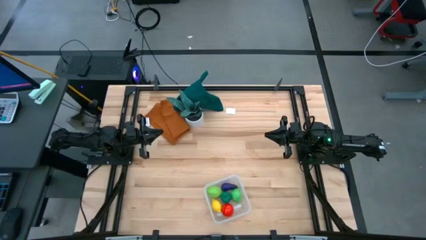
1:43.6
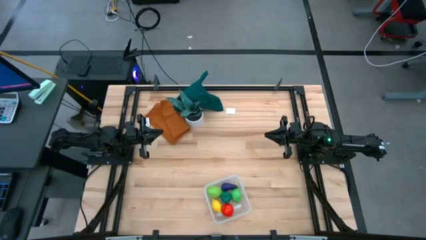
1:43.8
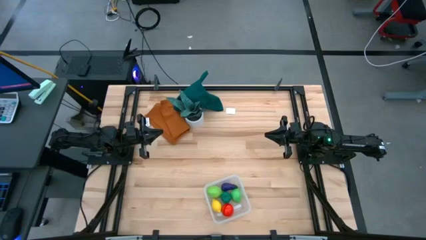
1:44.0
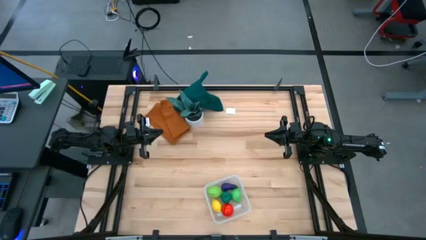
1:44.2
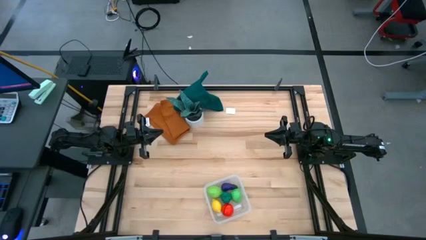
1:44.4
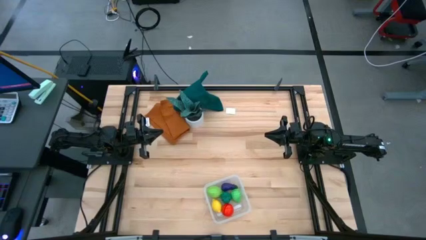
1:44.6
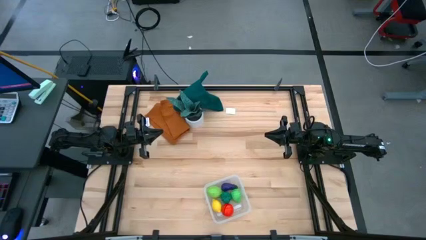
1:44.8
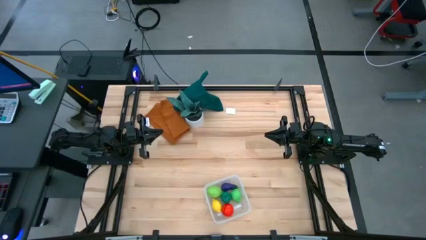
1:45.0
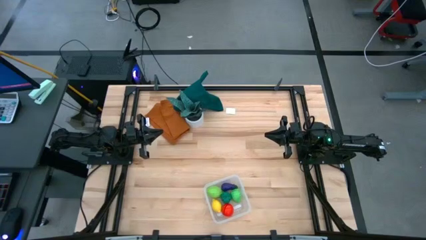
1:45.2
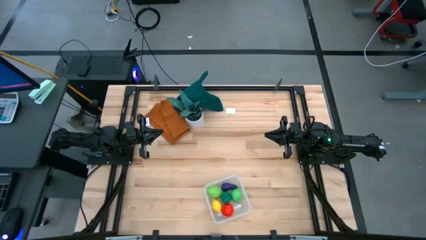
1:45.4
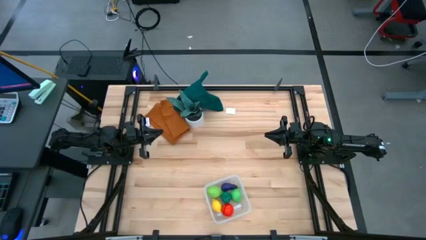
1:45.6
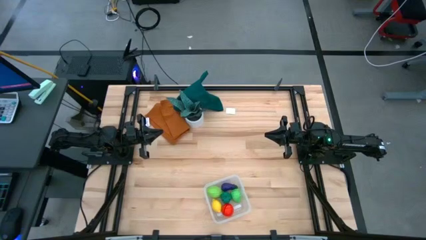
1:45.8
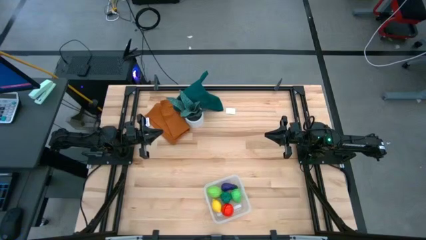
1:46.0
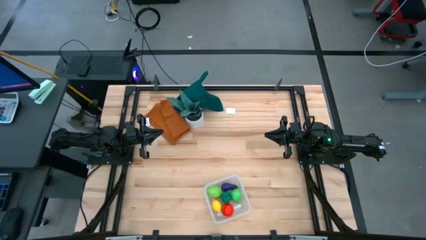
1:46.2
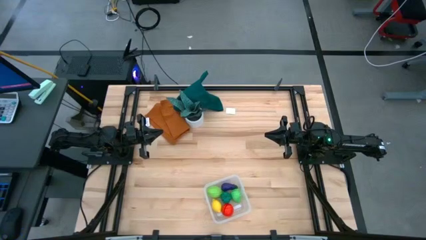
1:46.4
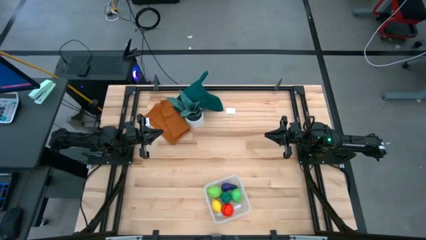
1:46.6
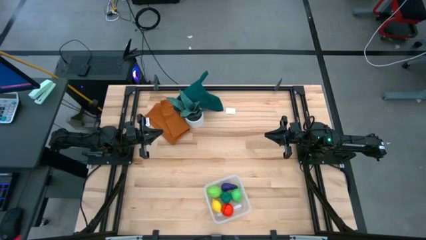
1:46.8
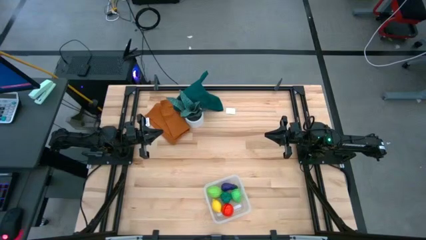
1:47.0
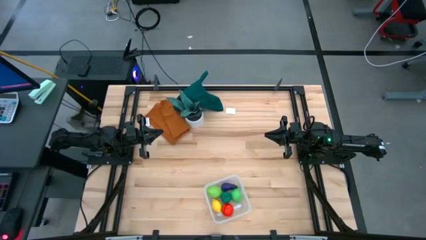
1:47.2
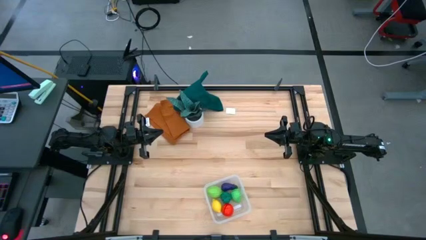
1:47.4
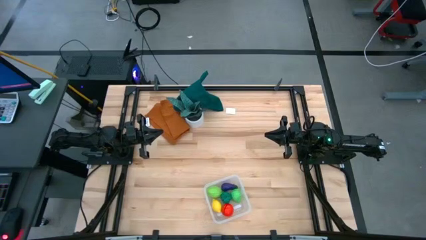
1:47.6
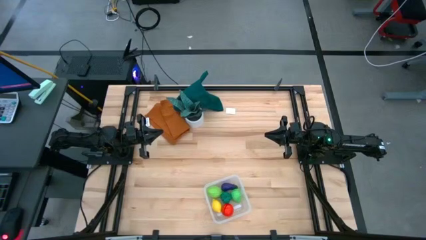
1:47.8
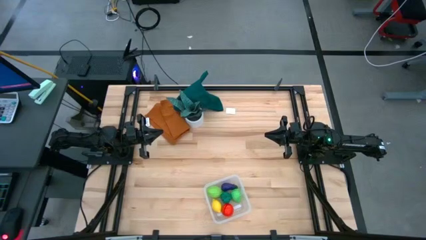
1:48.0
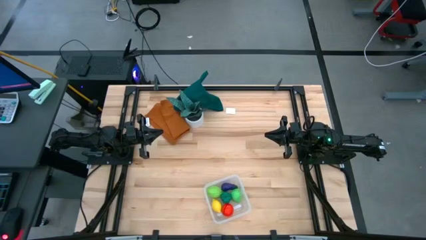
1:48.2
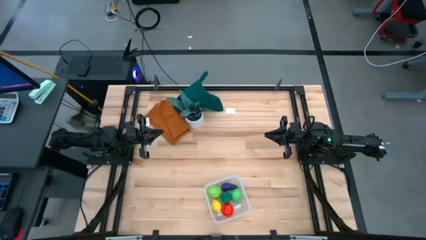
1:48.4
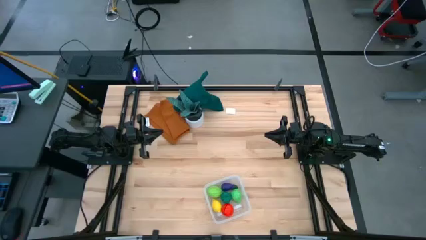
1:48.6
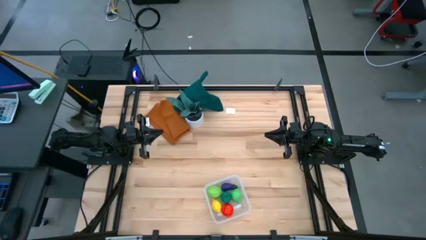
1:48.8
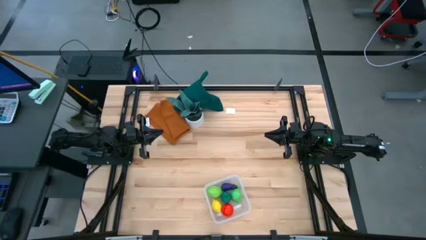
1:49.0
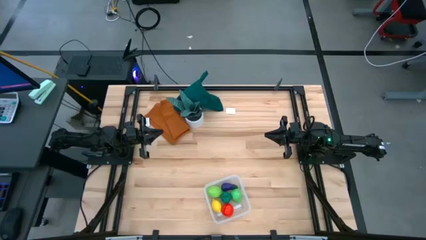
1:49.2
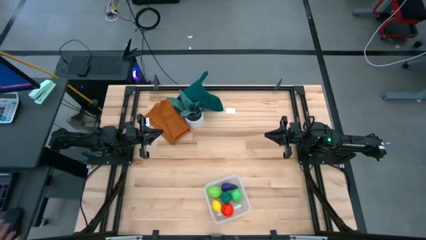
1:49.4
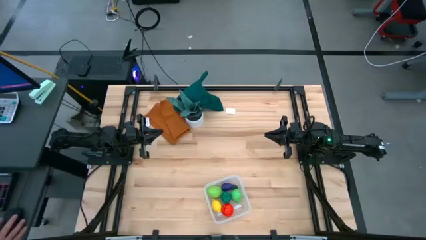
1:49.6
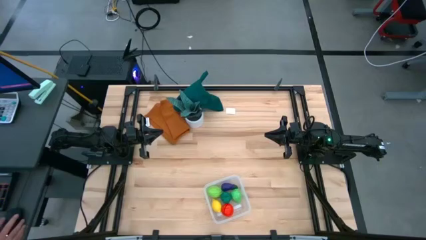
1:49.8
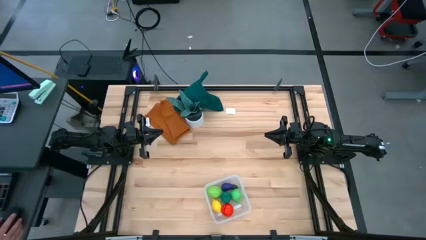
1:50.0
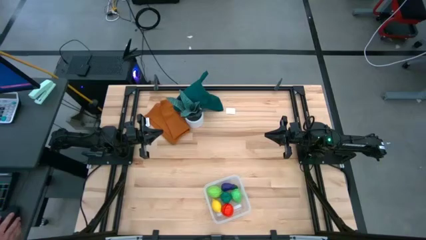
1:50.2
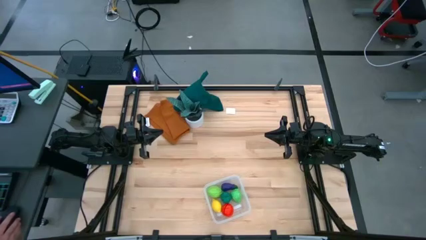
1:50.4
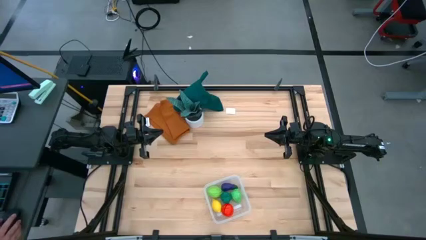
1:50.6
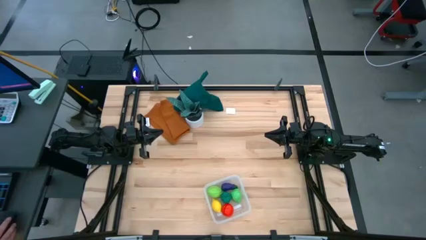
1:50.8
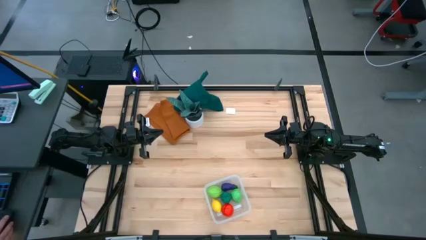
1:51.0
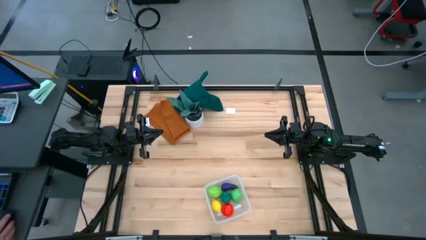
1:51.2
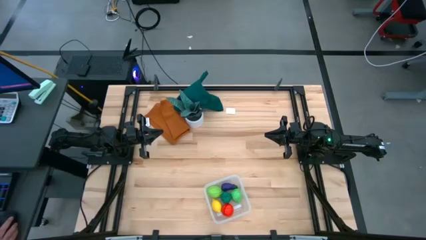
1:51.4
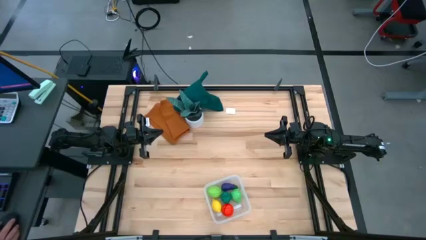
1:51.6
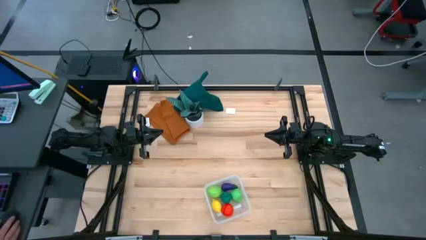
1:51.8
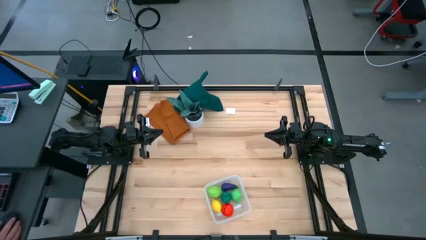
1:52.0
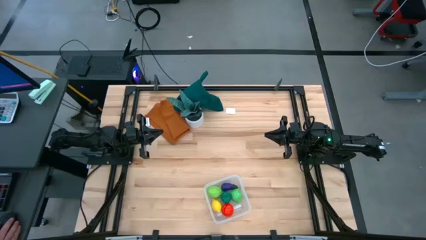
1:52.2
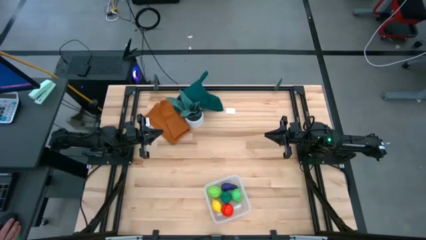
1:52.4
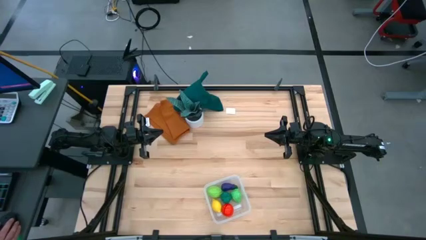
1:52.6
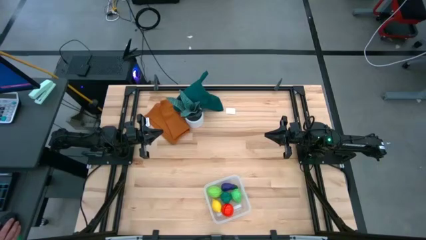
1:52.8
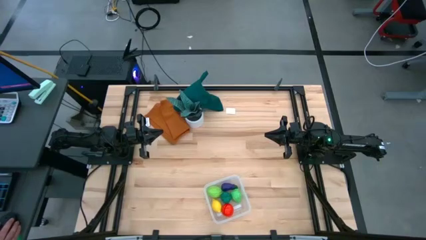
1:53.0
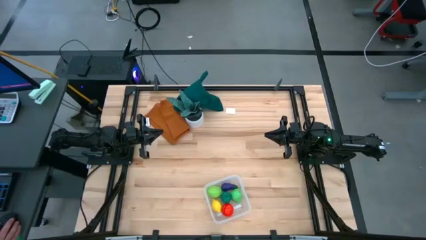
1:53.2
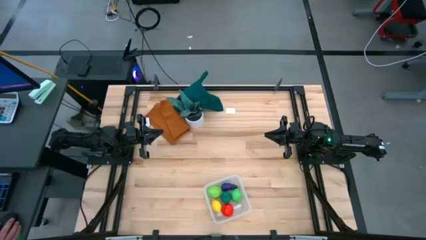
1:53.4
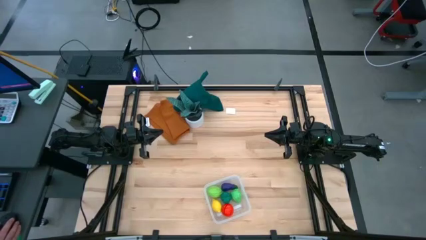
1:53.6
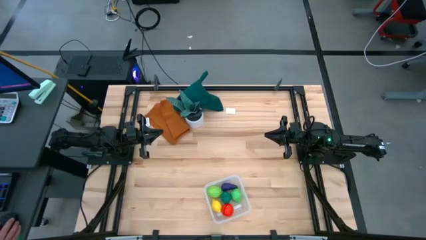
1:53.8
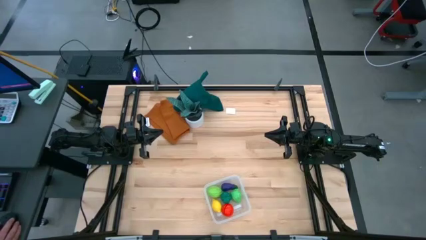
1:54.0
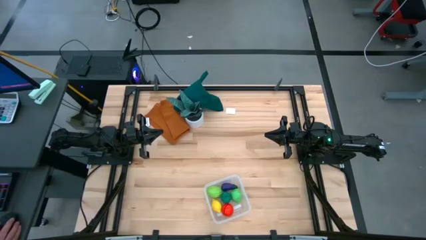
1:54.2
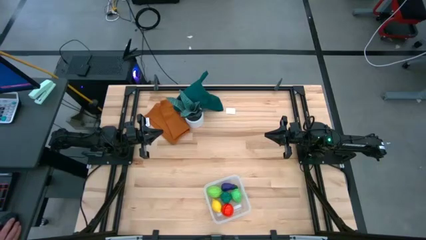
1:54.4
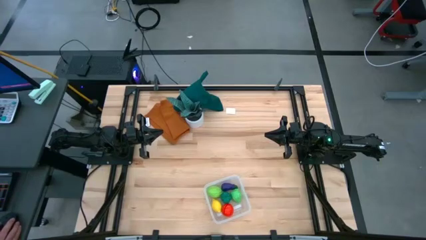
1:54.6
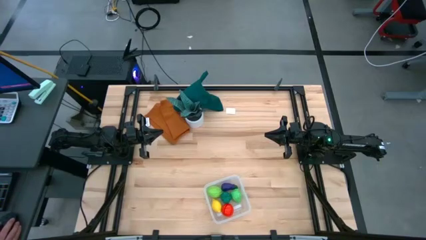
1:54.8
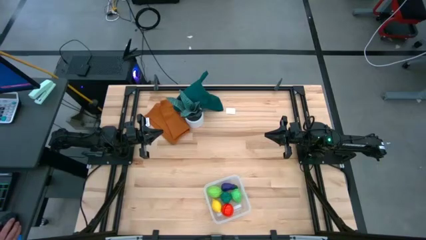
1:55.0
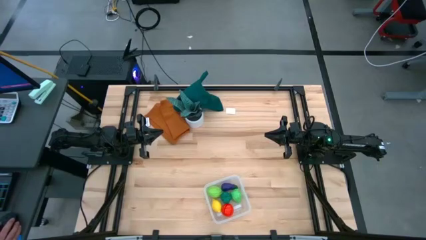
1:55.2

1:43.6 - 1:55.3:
Task: Pick and placing Produce into tupperware
Return to Home Position
